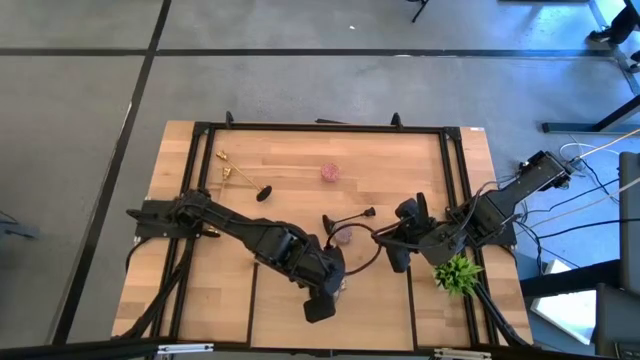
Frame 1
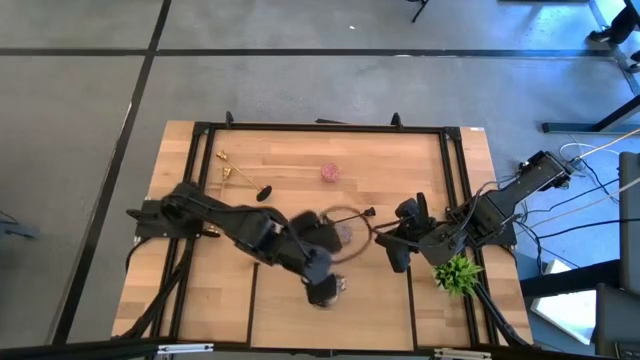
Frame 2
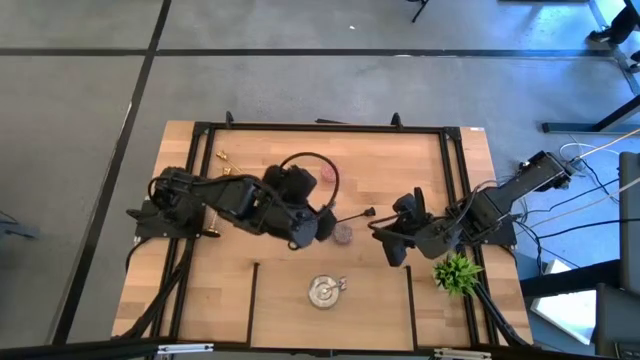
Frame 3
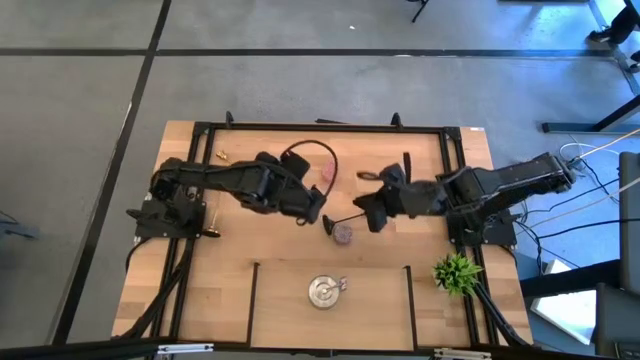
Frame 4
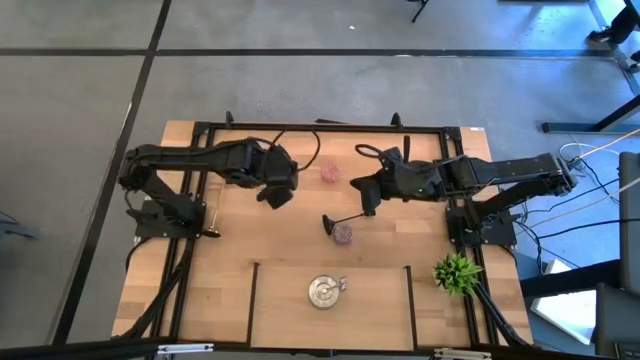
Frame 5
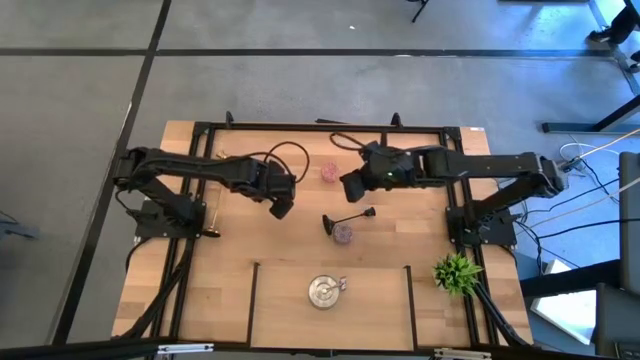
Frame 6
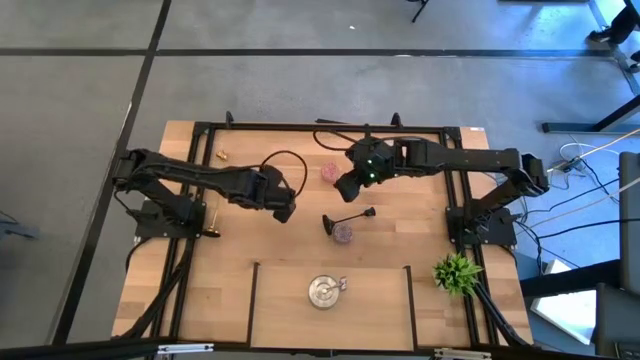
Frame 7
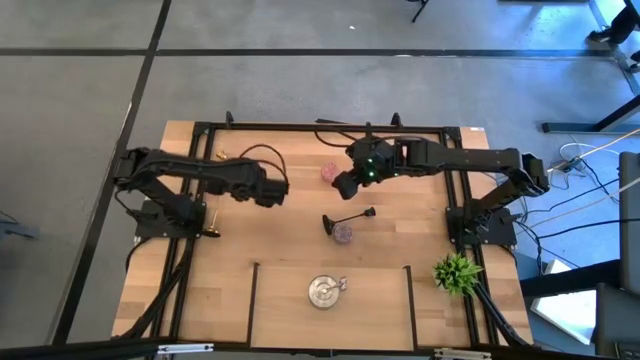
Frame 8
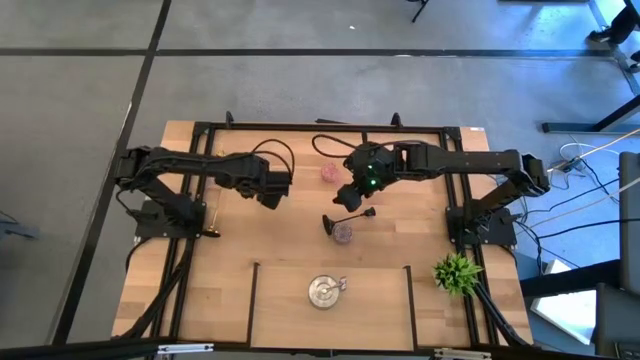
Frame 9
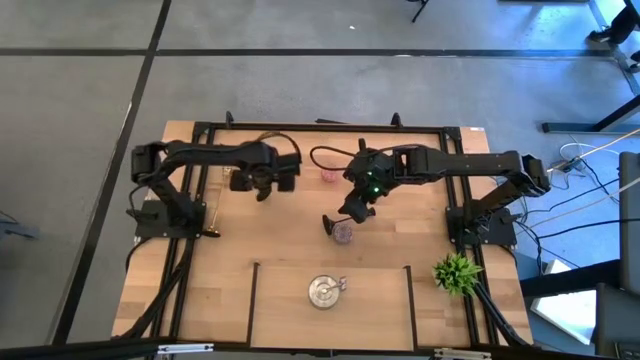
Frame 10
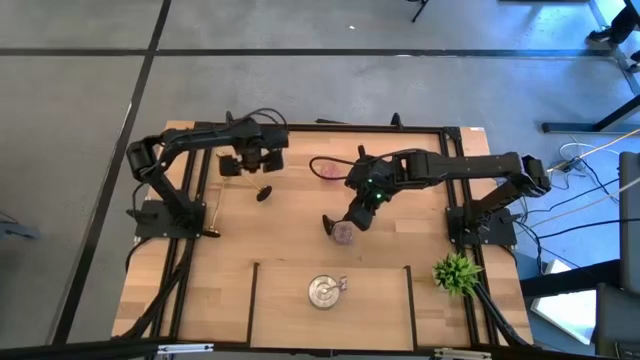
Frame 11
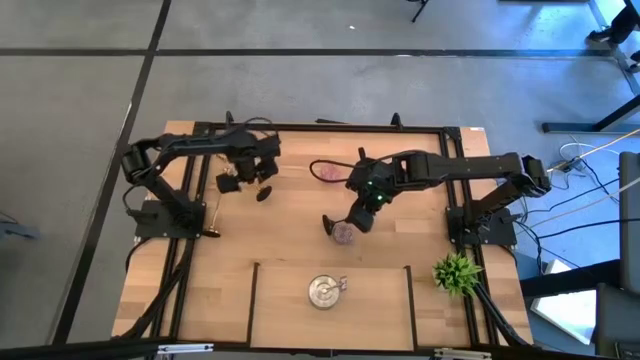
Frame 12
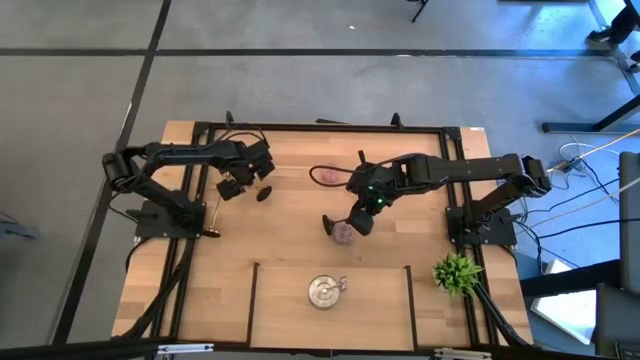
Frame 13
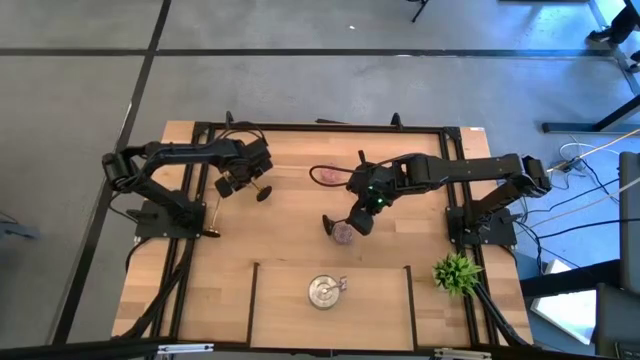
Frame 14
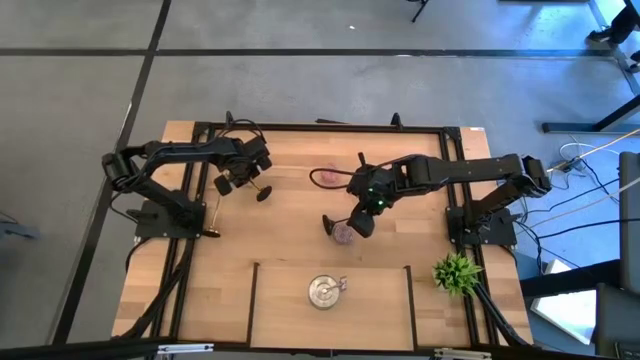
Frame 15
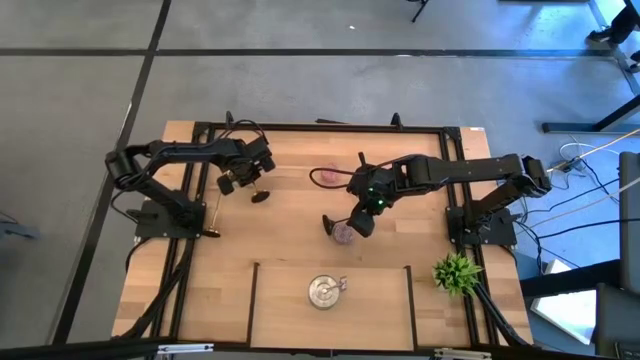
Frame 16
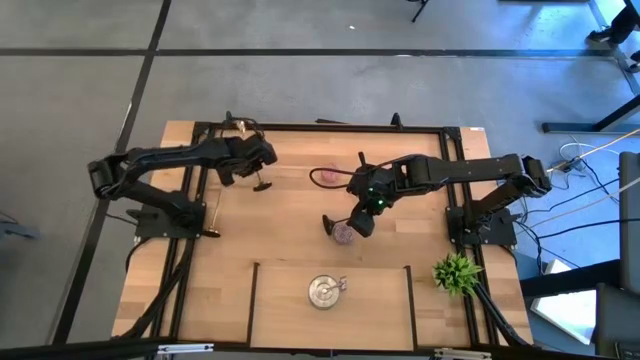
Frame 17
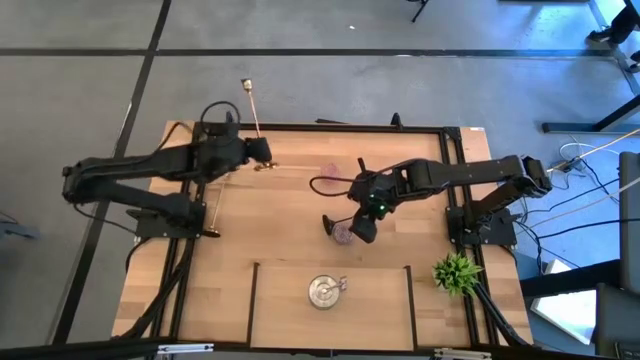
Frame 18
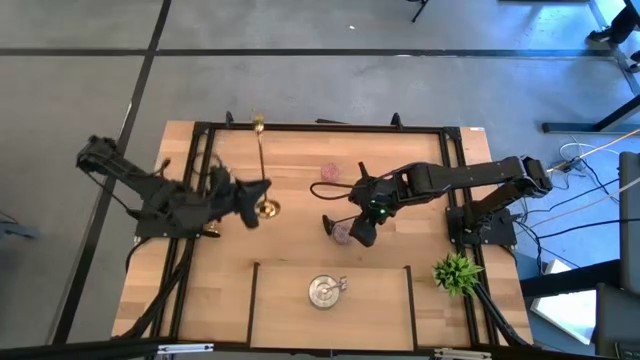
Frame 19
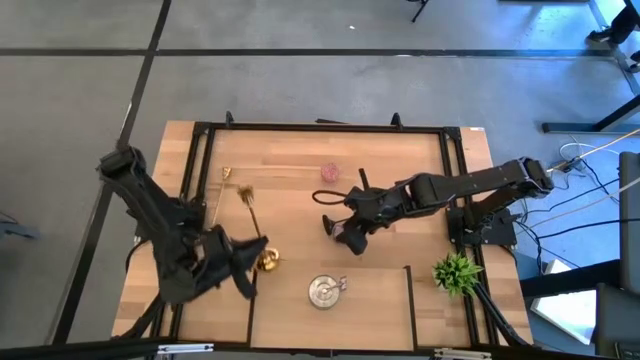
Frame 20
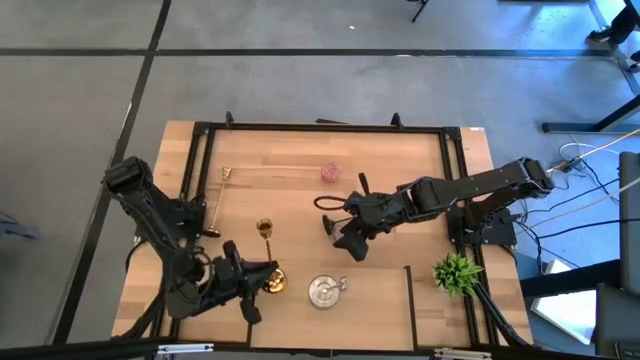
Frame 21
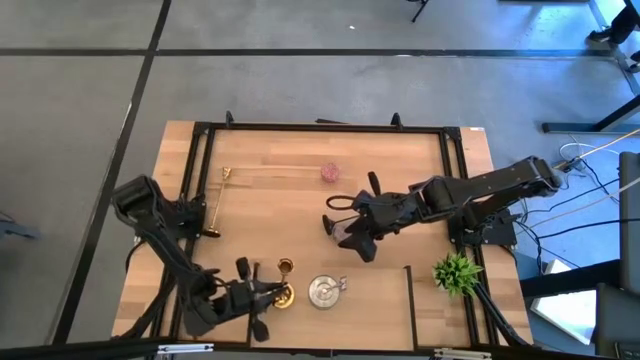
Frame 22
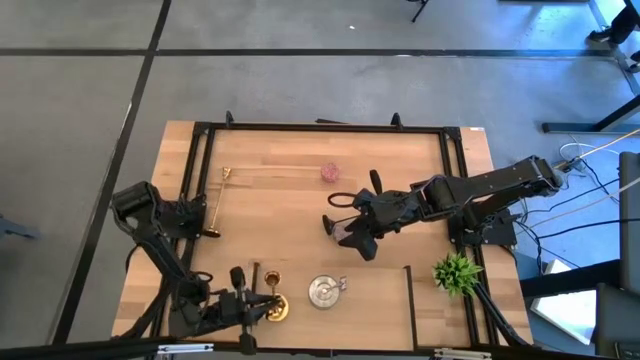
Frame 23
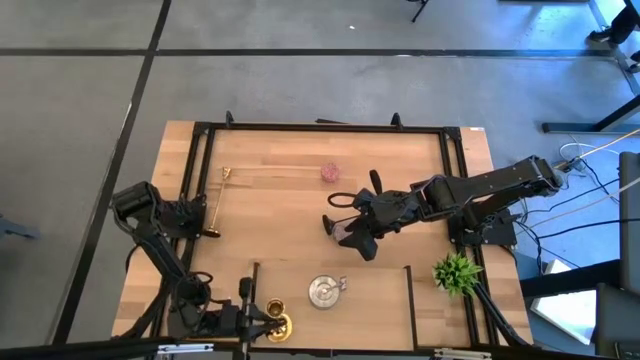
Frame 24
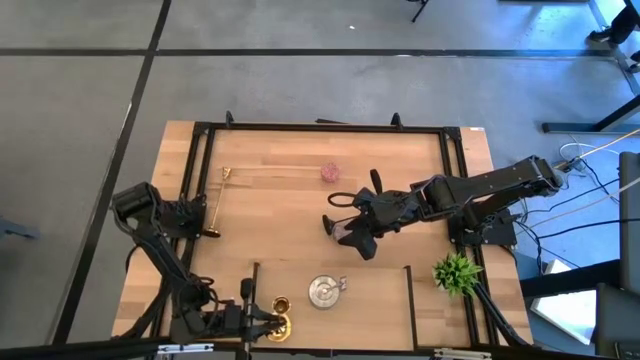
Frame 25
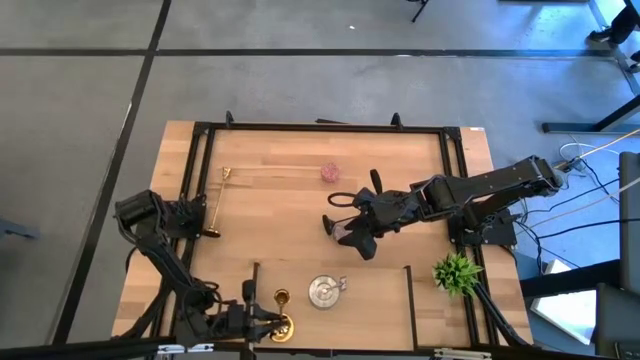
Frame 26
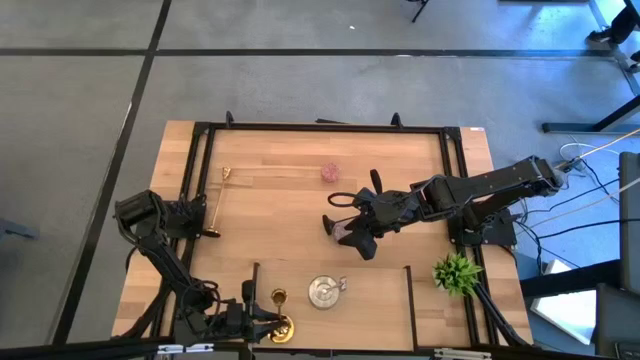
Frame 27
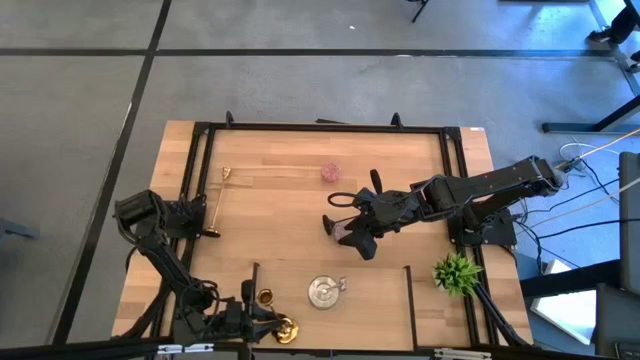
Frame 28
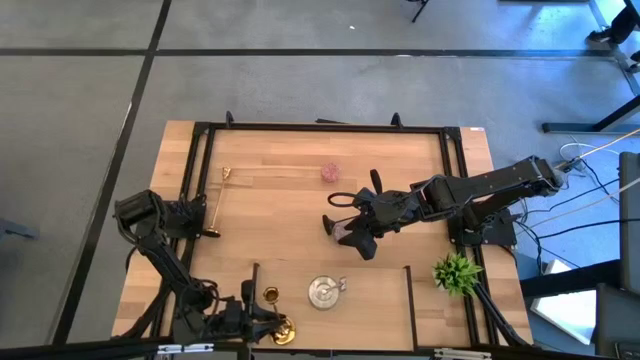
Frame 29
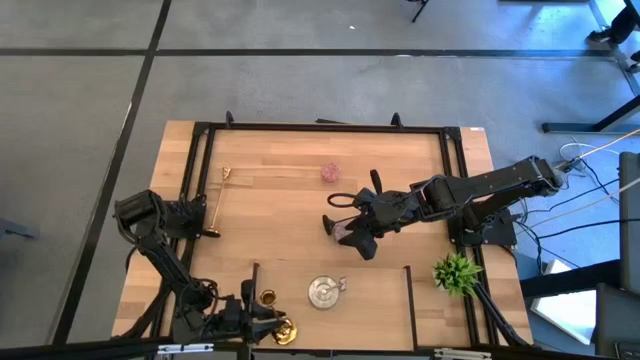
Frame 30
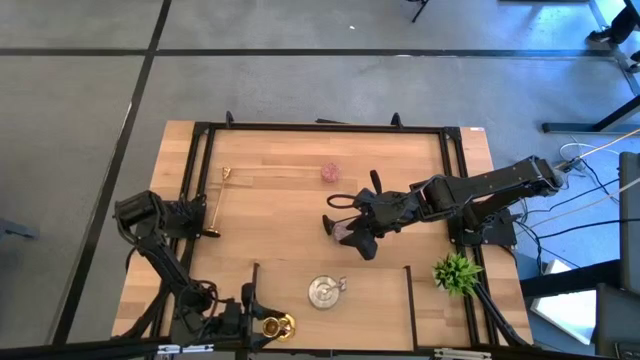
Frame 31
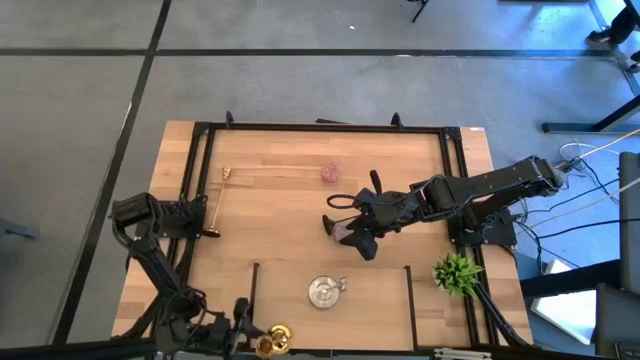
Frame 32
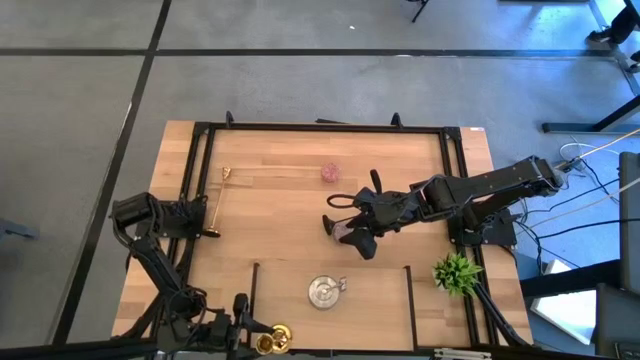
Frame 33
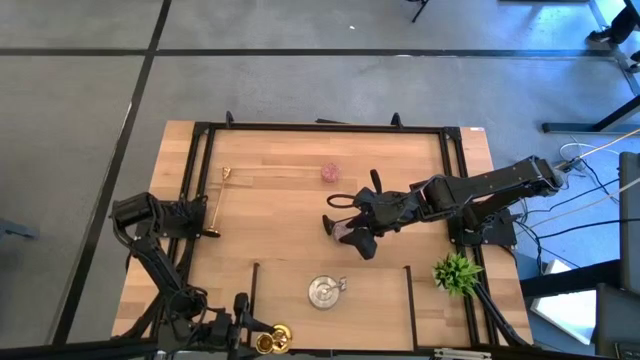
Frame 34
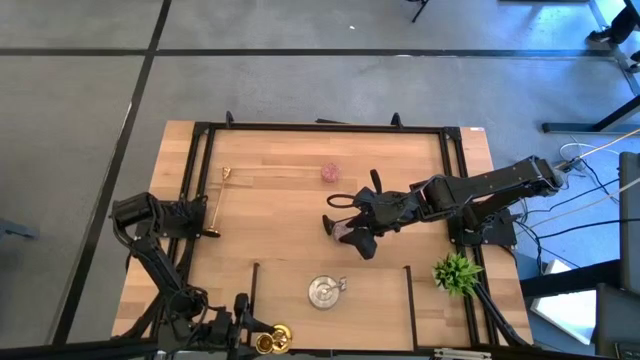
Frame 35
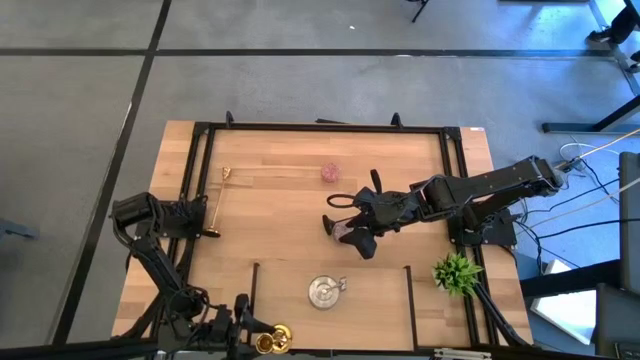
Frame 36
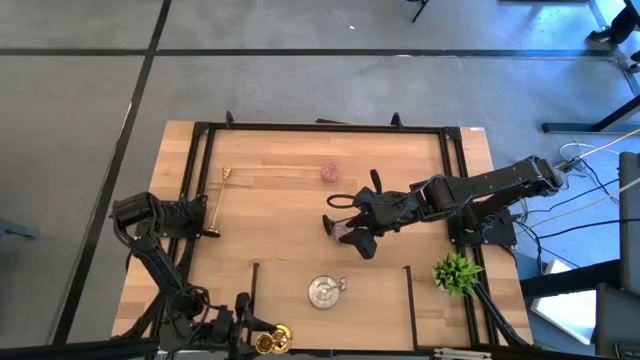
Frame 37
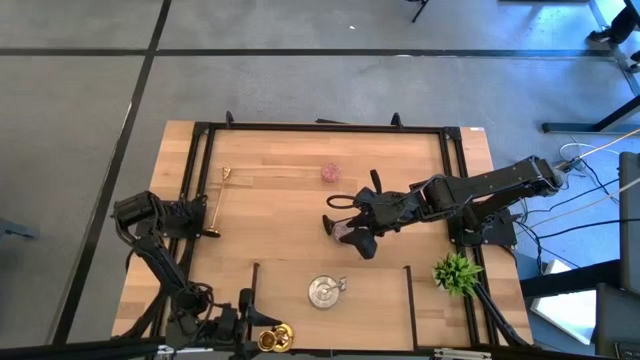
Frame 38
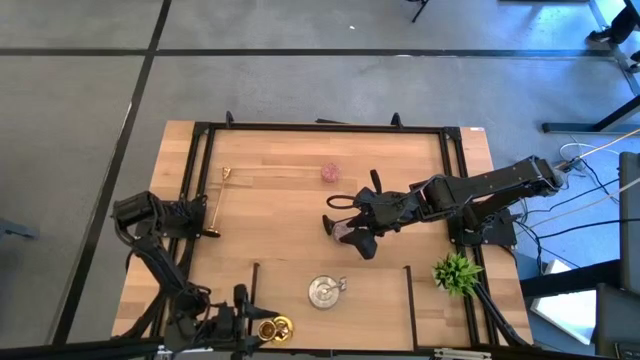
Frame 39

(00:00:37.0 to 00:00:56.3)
Task: Pick & Place candle stick holders
Put the right gold candle holder on the shelf

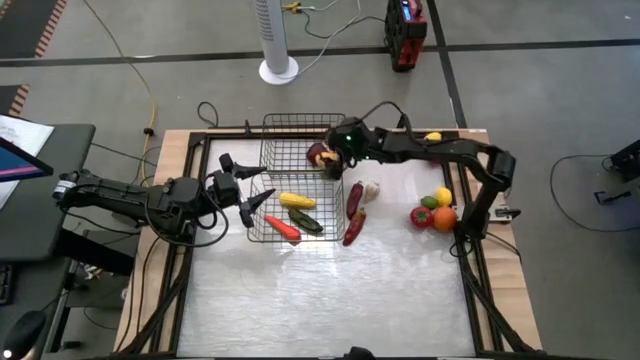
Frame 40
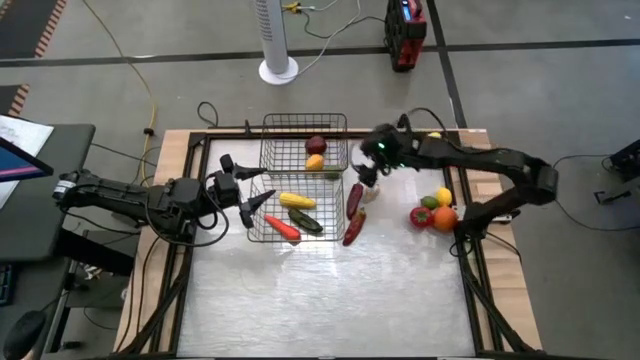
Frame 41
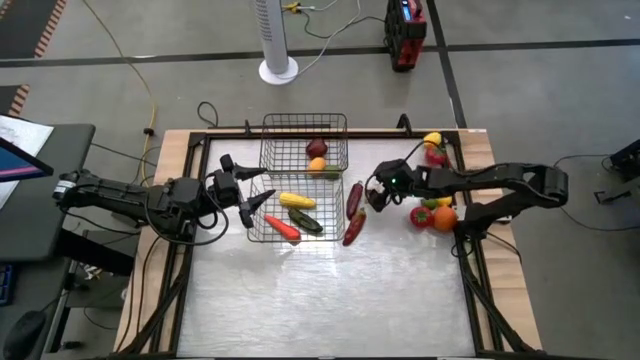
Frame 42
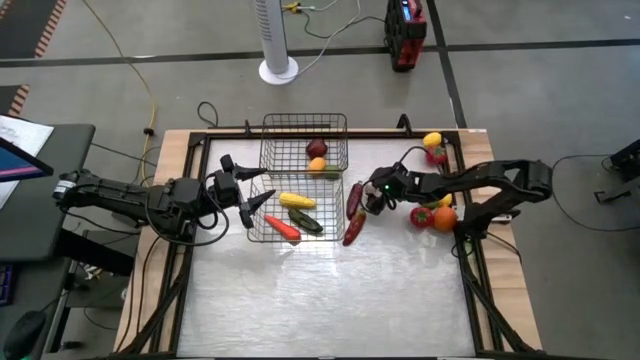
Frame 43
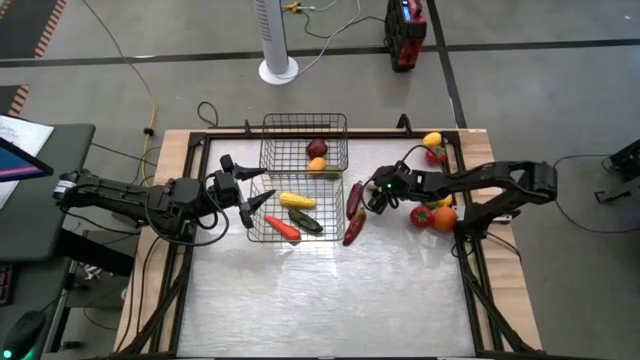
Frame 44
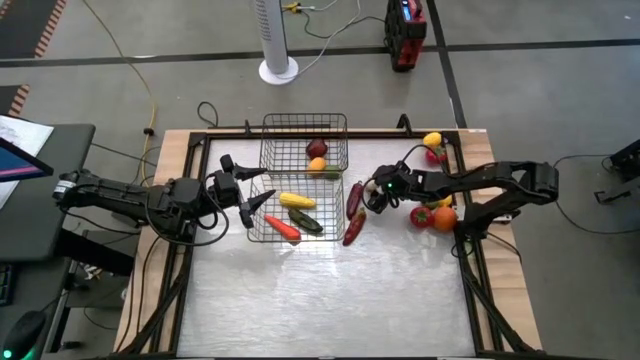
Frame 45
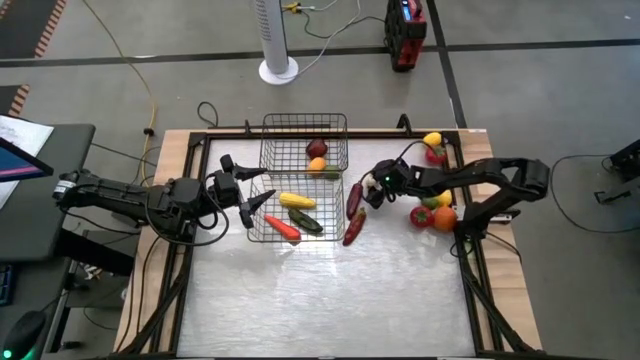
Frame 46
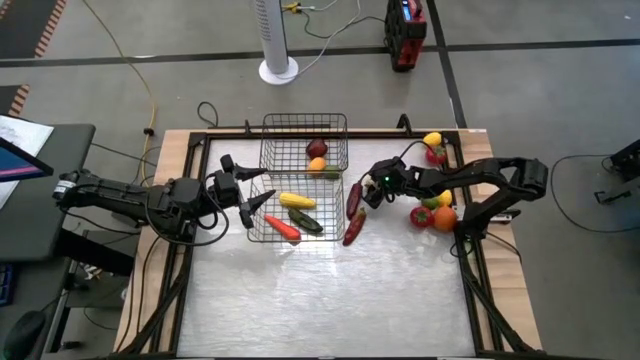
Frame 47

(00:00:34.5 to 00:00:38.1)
Task: Sort produce into baskets
Put the garlic into the bottom wire basket
